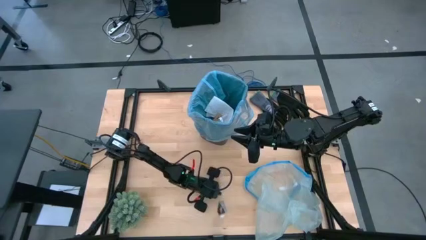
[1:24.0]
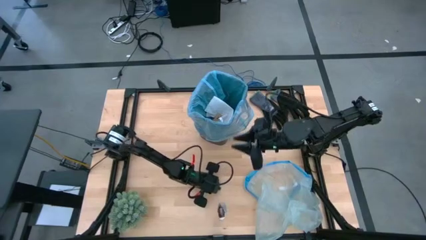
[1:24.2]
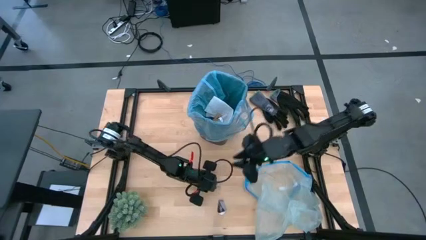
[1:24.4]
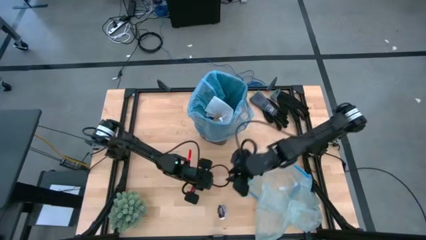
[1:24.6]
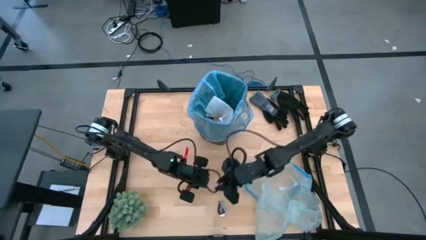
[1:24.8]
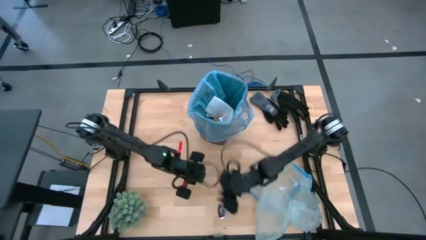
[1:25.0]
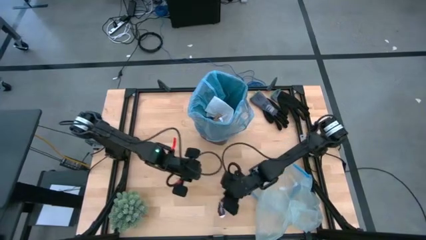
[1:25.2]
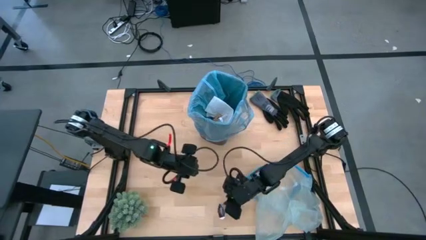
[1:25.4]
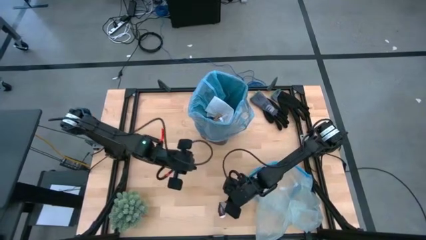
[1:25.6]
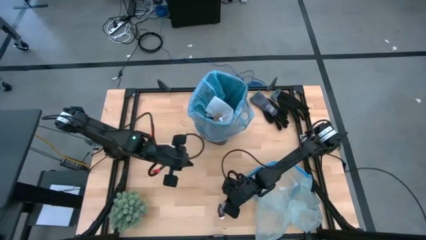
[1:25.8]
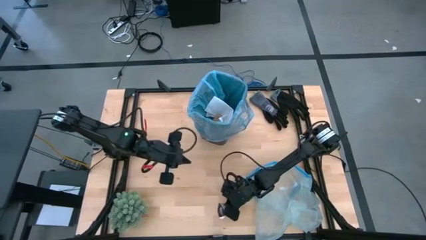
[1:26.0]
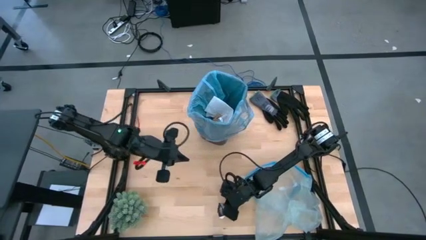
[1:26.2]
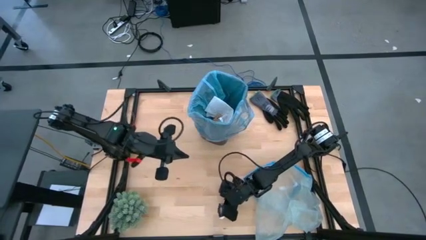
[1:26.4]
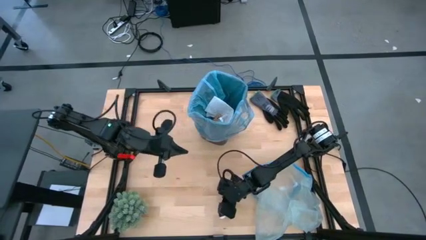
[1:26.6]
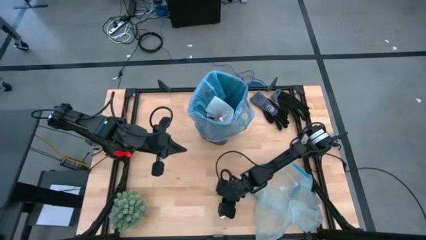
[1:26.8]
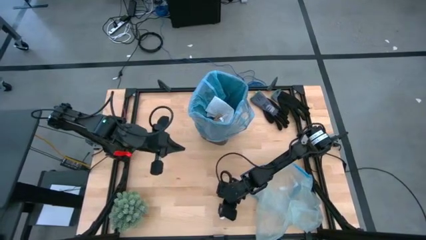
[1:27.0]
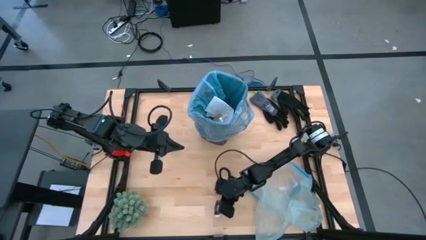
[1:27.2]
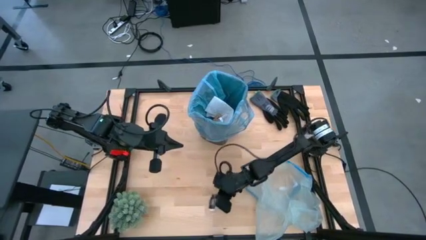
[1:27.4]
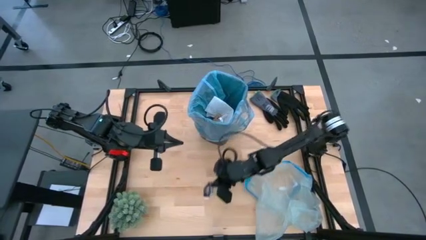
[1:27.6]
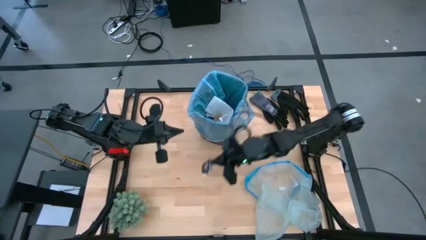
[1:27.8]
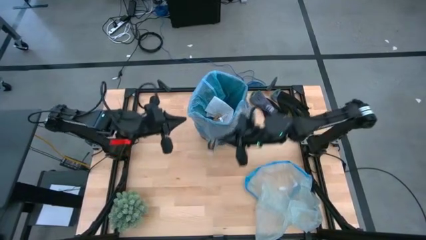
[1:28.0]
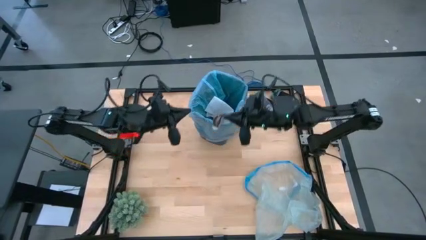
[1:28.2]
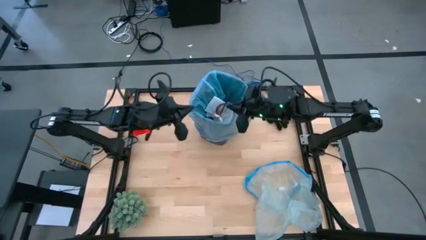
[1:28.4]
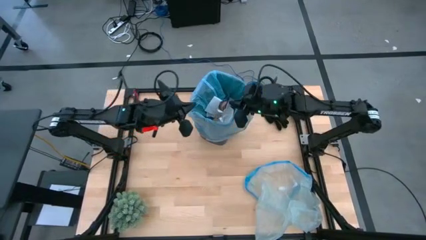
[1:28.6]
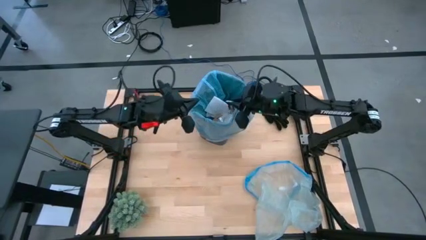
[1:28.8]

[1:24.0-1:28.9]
Task: place trash/remove bag and relplace
Put the plastic wrapper into the trash bin

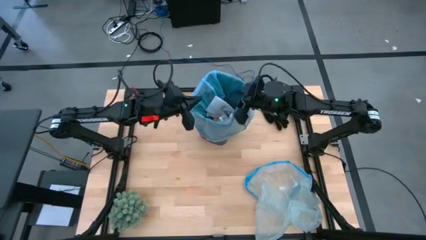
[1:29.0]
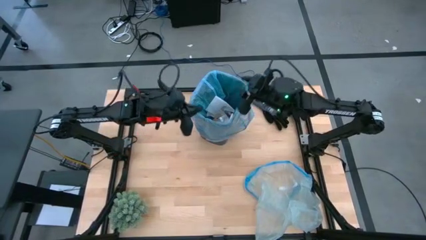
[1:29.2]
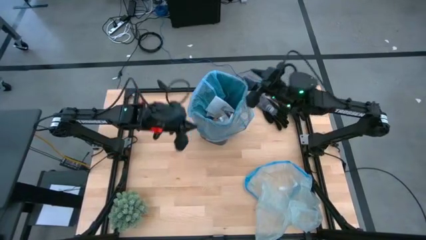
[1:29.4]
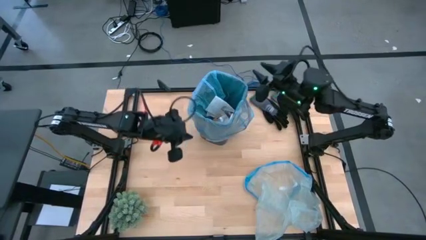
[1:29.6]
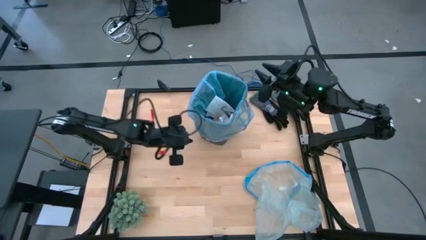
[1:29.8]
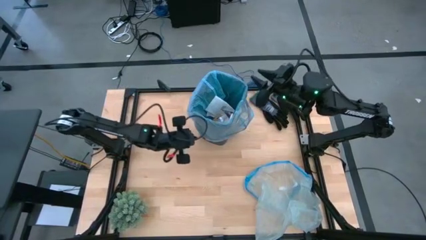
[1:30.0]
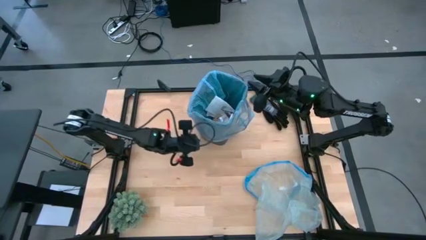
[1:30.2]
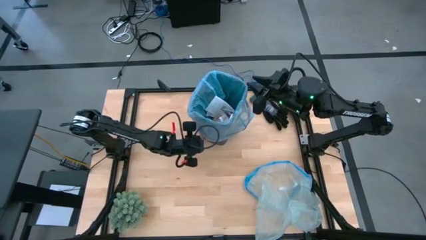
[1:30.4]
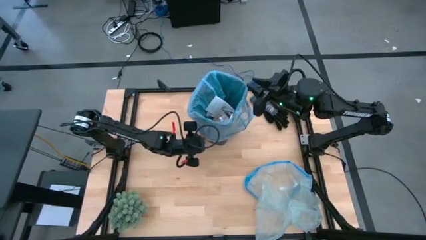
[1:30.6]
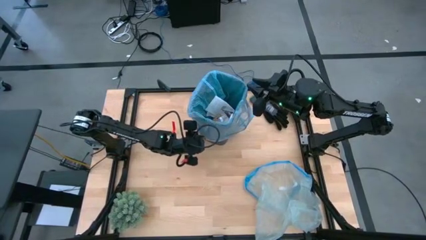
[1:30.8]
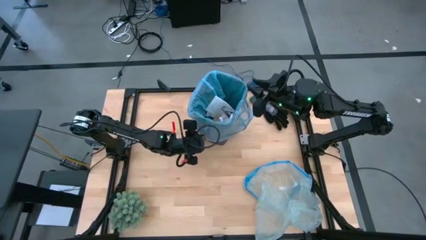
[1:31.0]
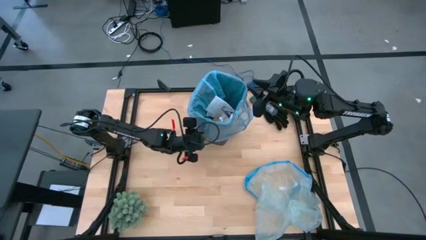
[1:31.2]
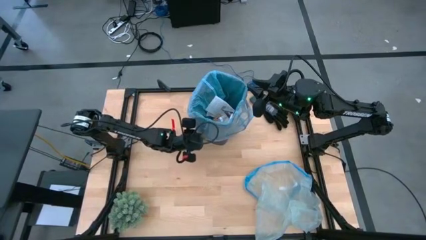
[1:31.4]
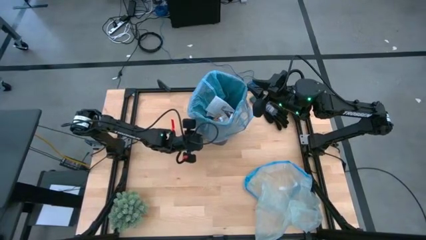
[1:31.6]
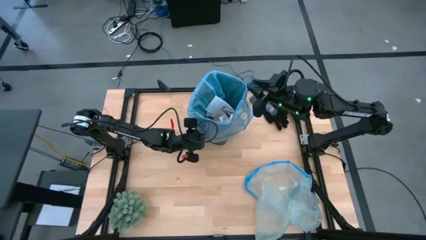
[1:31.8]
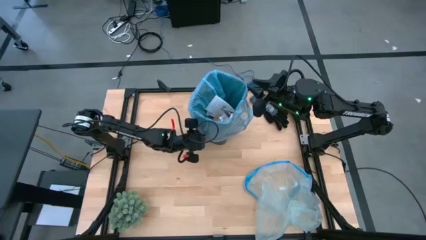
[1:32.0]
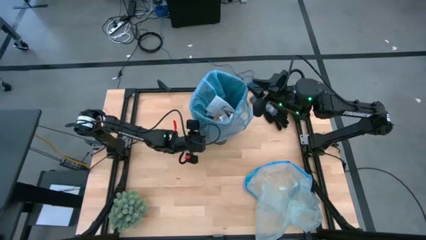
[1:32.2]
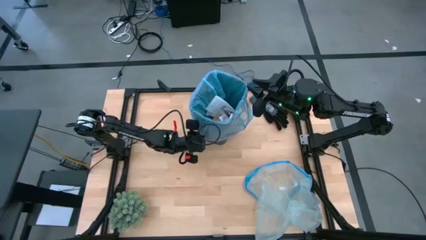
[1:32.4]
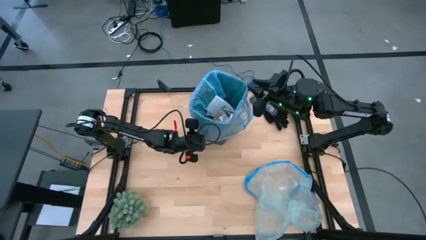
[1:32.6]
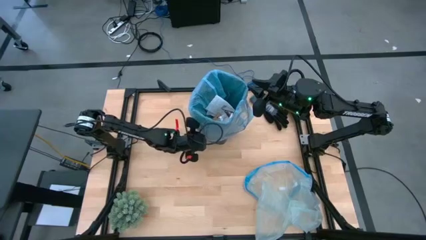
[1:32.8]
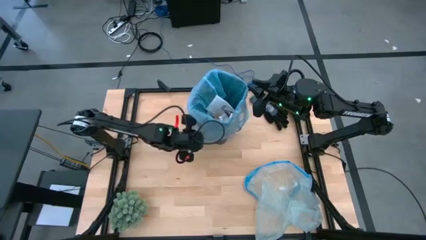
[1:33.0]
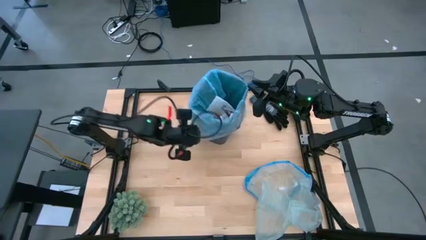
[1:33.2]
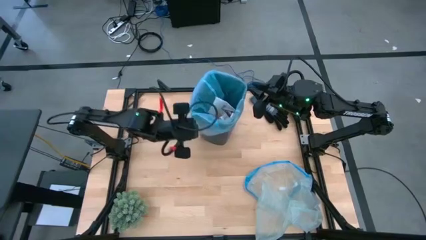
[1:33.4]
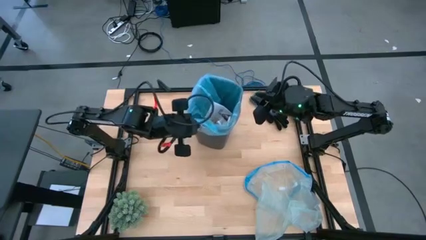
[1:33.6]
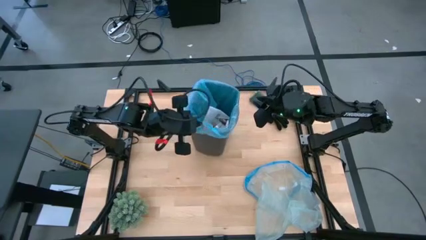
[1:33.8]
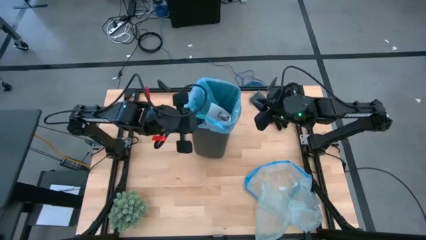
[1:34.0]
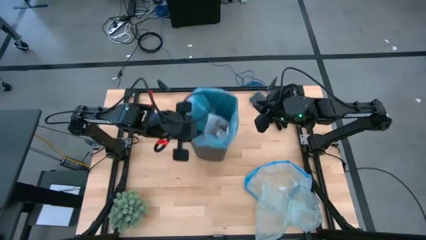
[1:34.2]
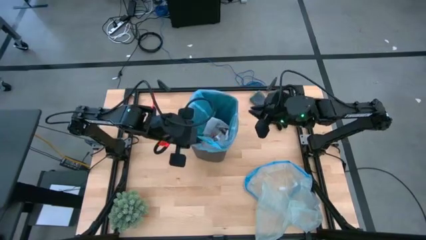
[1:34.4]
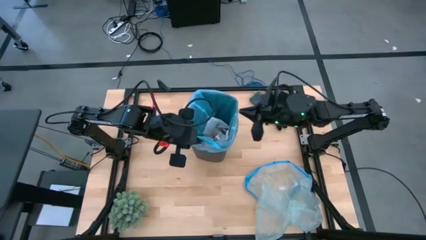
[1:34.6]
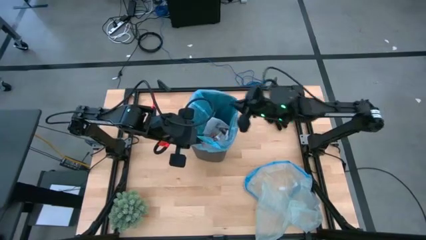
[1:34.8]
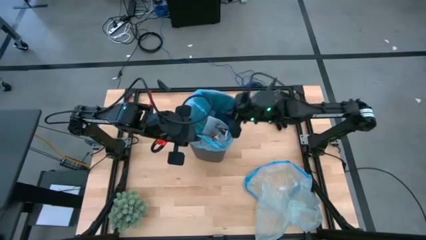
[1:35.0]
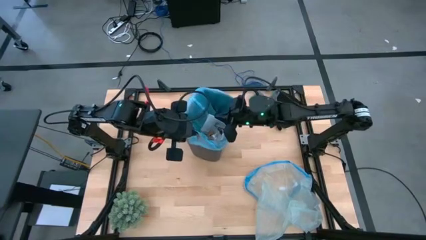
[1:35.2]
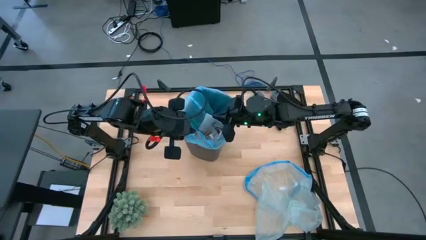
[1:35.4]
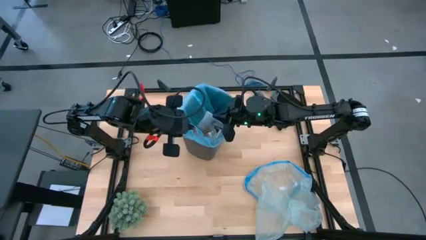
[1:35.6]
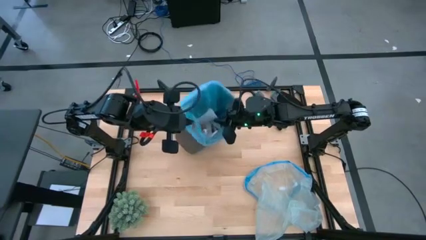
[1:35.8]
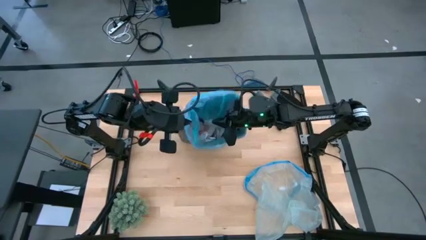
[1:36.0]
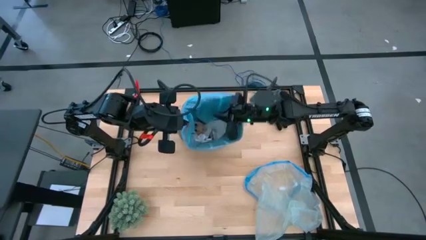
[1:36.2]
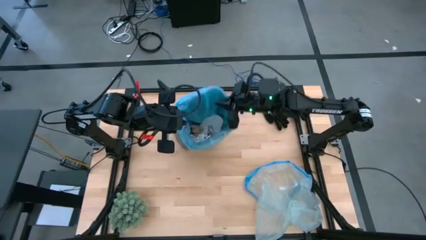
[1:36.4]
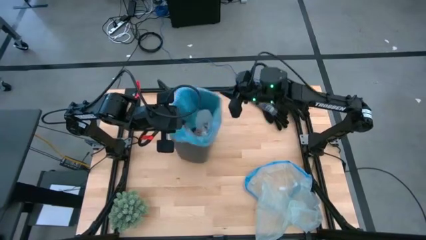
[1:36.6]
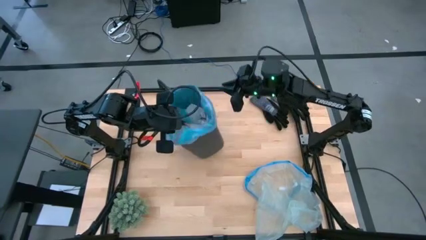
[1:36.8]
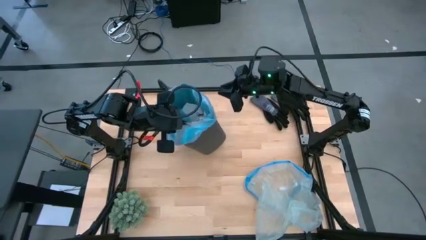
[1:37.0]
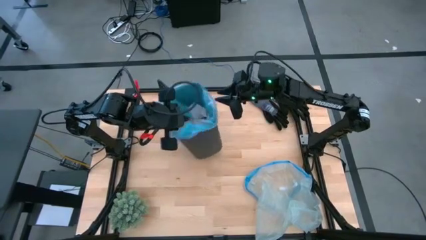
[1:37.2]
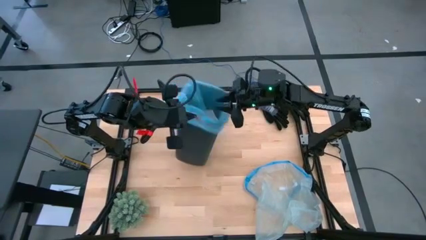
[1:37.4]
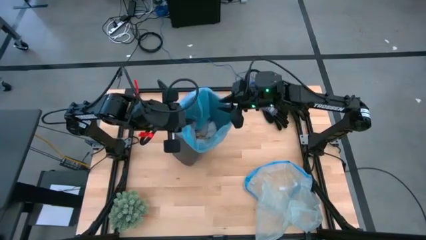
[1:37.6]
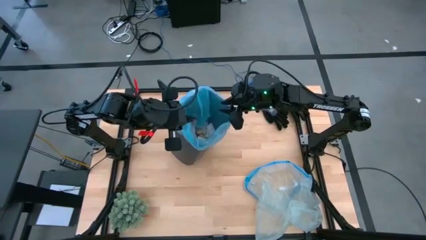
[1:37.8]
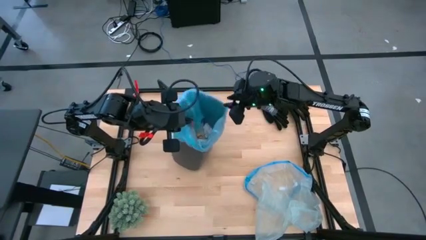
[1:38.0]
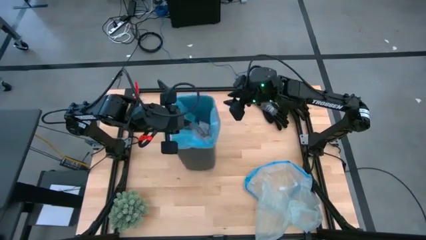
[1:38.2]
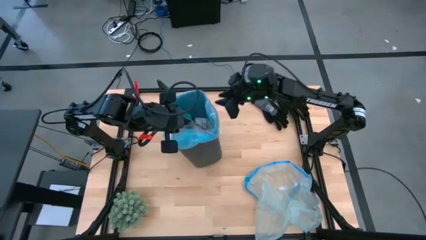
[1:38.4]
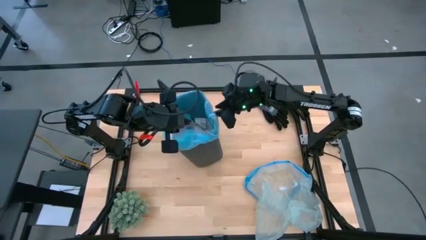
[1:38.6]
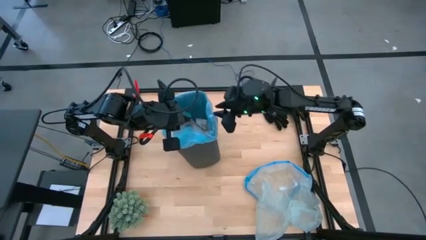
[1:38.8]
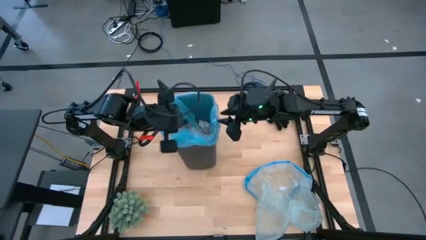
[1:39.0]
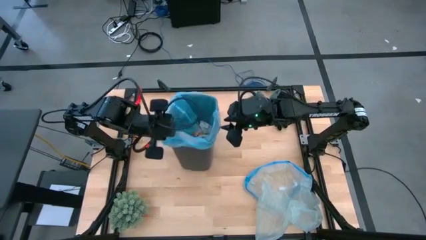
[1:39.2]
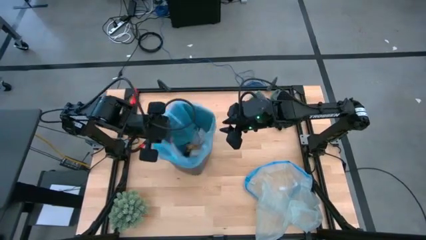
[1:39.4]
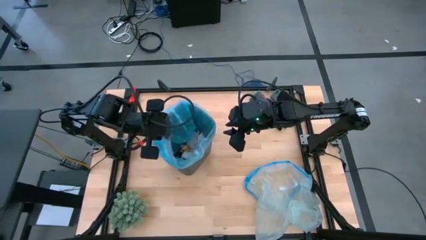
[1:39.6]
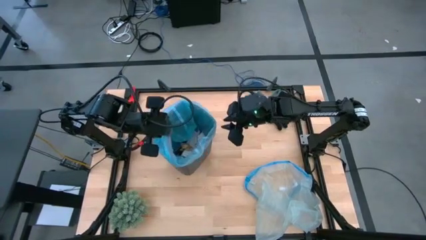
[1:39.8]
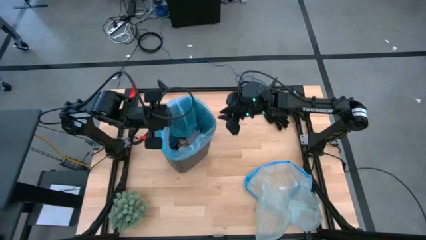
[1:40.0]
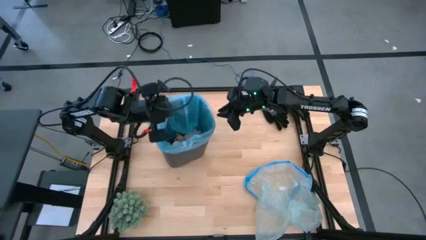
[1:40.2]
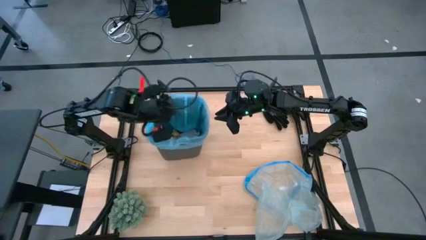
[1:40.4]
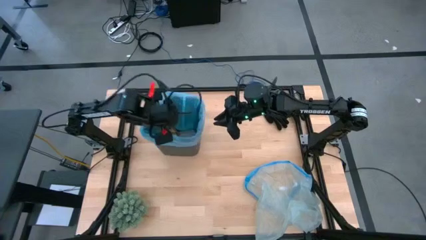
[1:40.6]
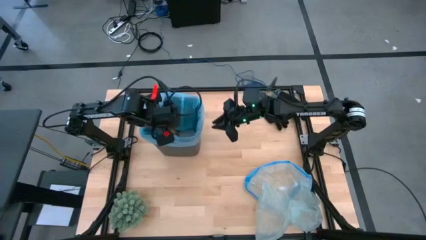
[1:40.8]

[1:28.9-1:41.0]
Remove the trash bag from the bin
